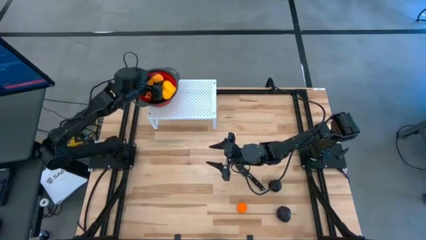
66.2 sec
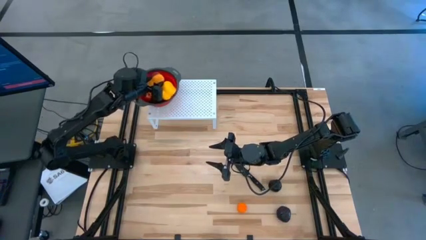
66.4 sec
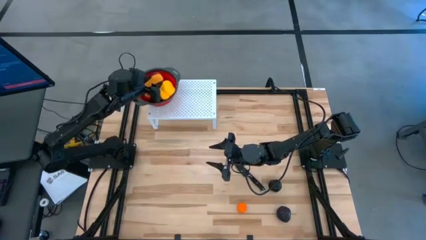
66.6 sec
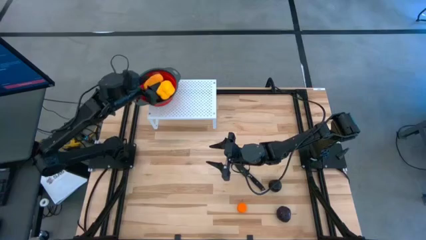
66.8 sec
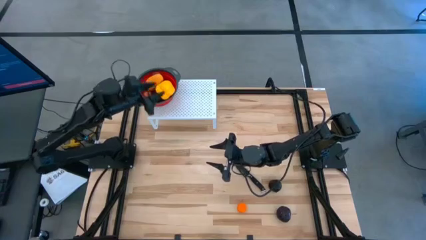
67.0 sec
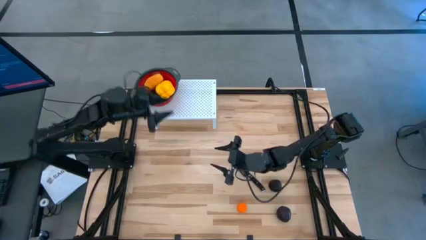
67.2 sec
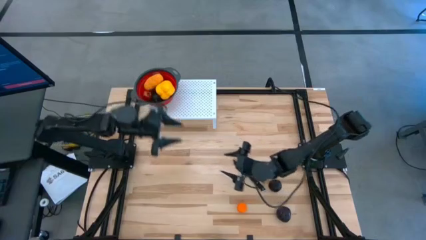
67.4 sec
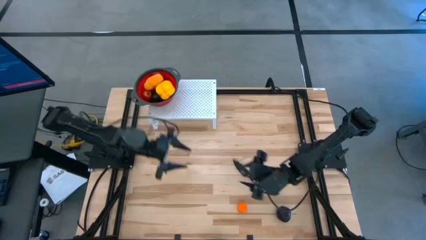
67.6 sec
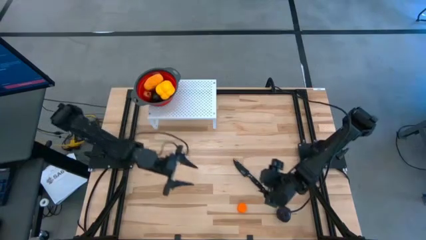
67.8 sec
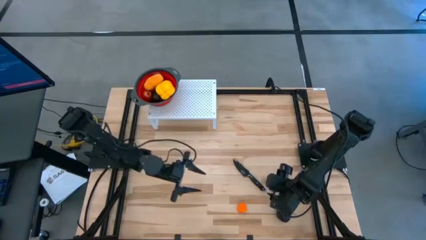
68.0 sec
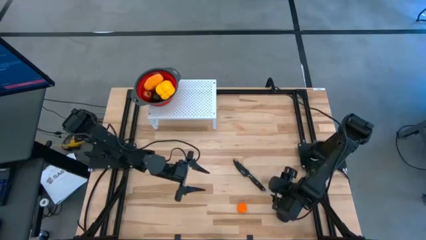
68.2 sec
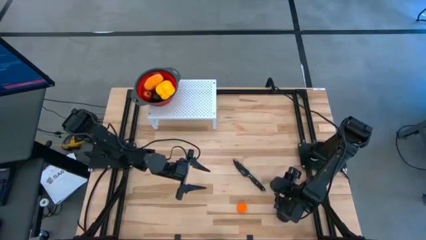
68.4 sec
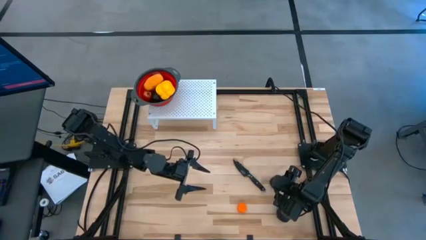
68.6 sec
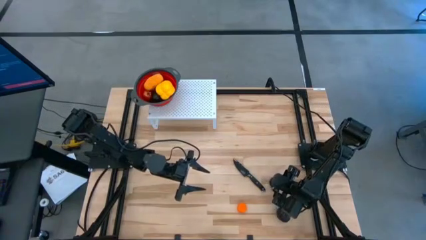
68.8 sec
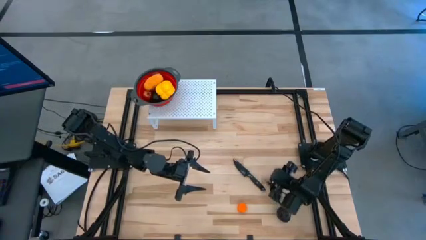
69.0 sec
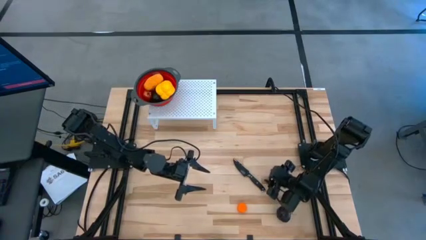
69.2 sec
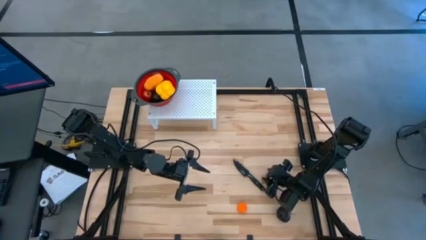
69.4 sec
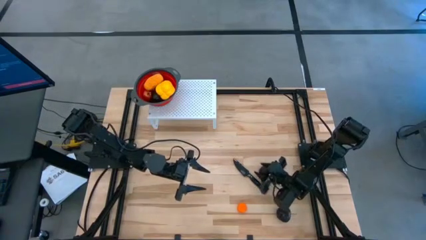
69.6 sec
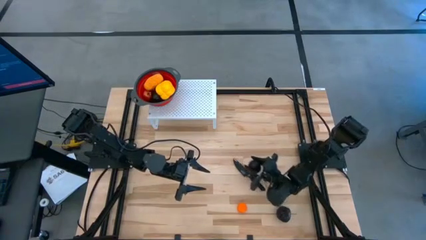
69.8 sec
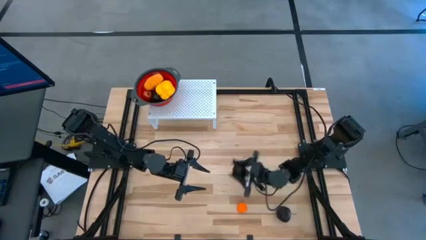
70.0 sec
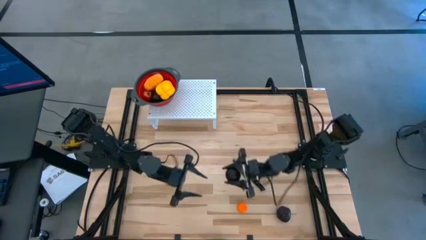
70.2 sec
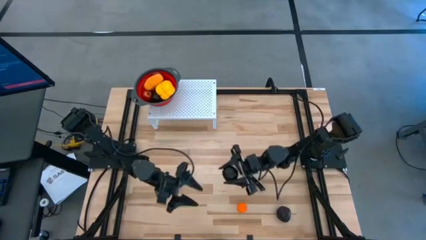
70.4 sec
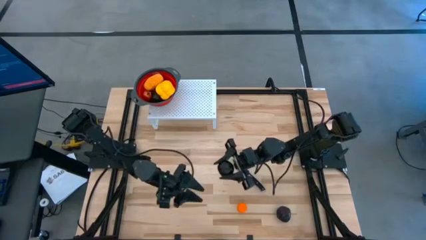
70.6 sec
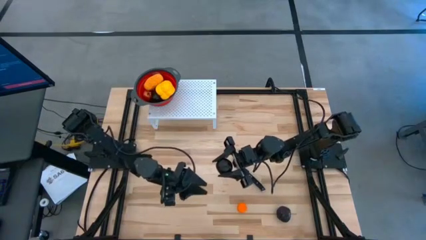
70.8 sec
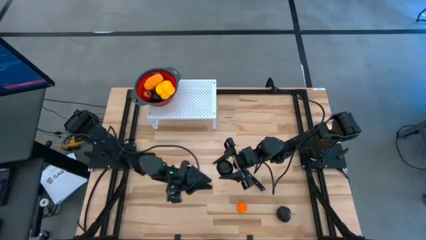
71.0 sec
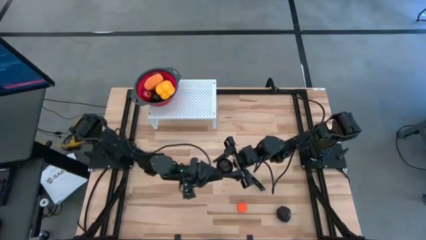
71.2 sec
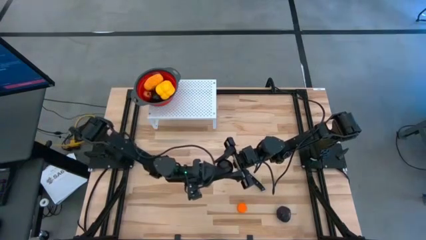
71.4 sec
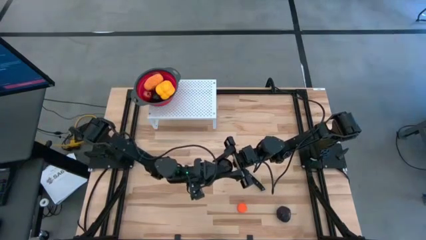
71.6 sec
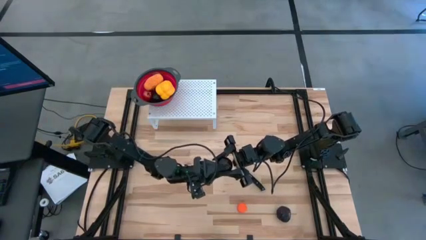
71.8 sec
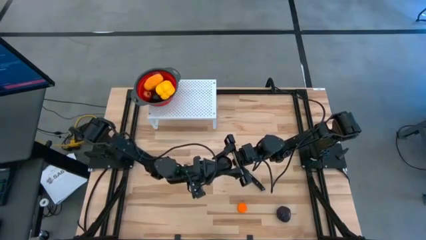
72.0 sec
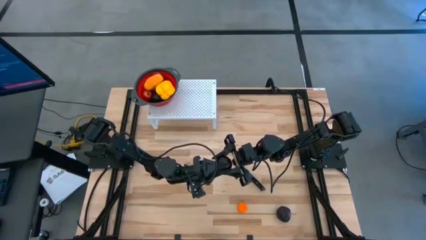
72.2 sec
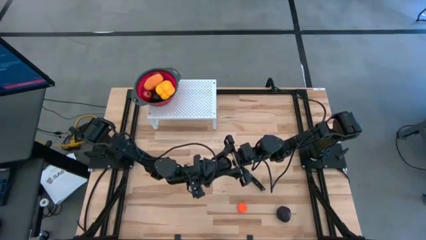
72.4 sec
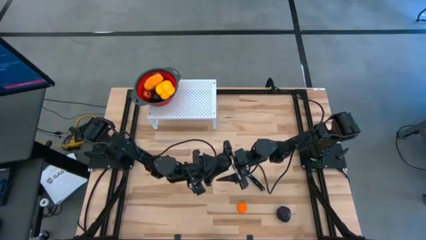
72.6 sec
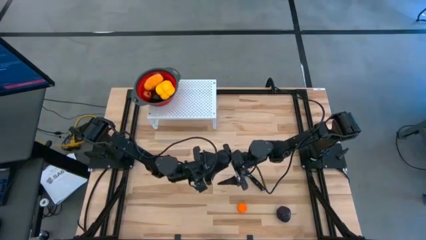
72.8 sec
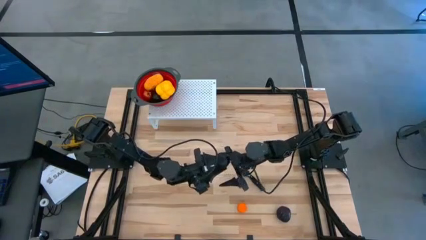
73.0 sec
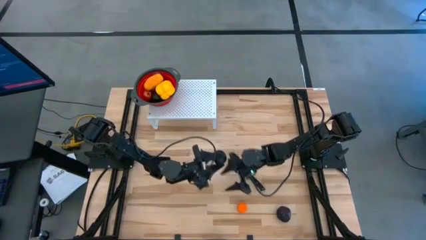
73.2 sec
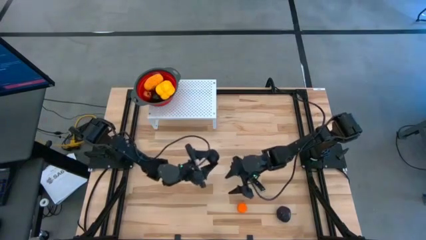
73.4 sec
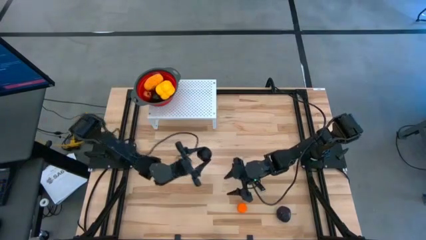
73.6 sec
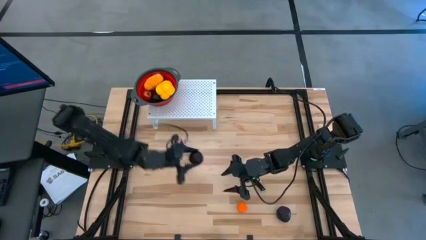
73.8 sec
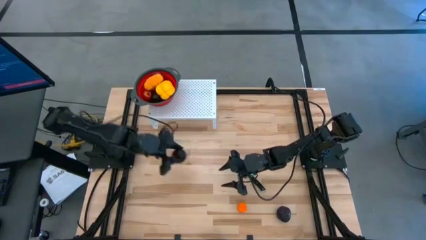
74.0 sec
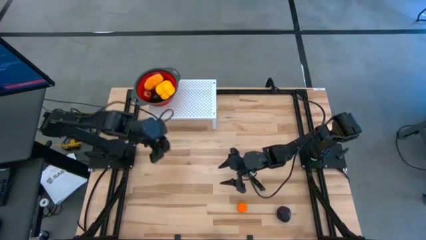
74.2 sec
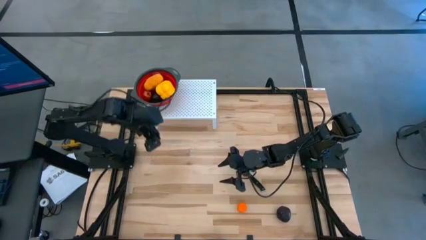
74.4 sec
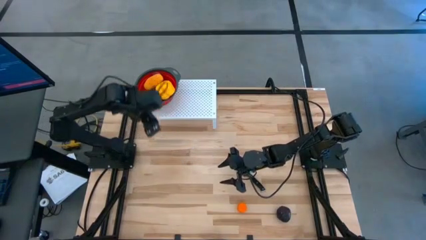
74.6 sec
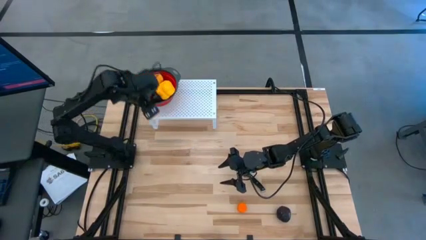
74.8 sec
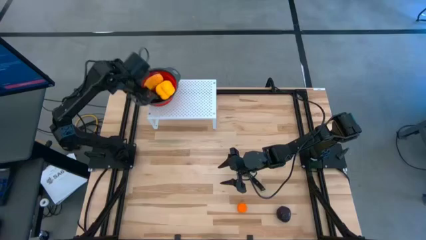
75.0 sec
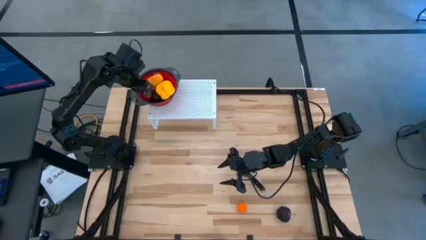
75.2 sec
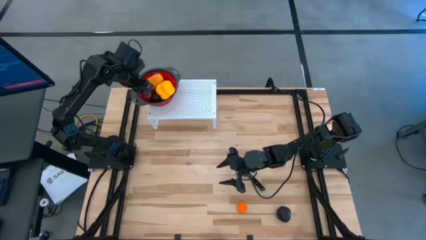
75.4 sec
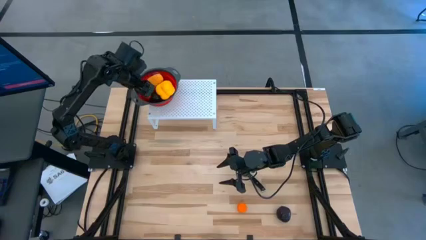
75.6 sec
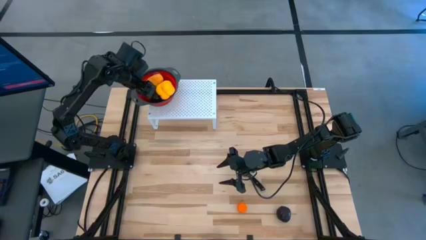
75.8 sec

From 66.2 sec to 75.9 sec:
Task: Pick & Place Fruit
Put the top purple plum into the red strainer bowl on the shelf

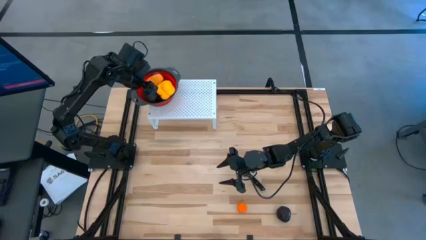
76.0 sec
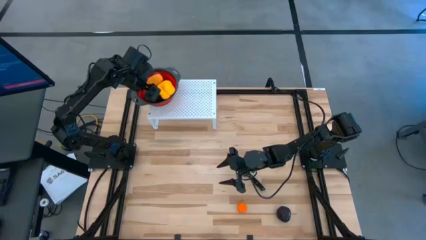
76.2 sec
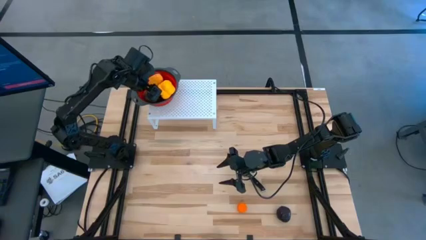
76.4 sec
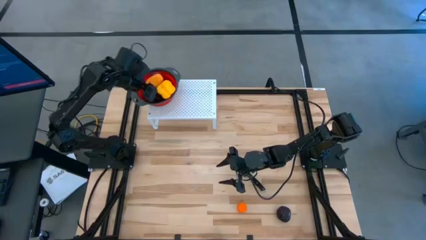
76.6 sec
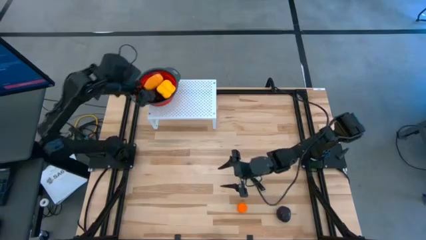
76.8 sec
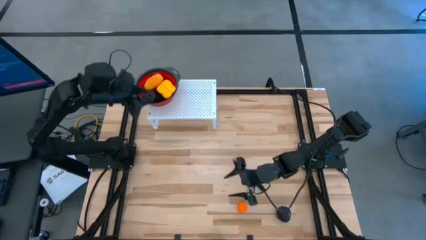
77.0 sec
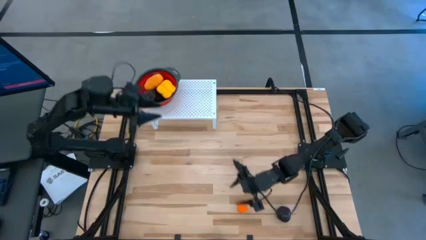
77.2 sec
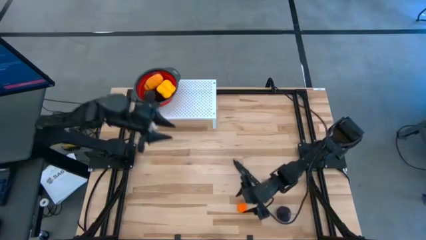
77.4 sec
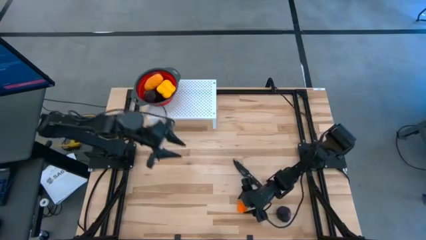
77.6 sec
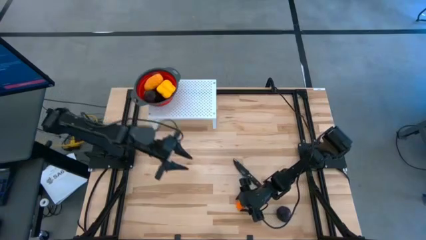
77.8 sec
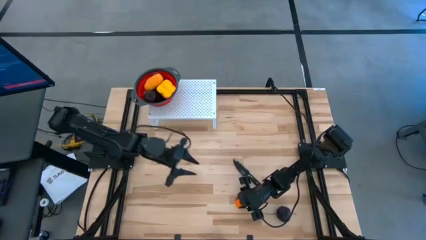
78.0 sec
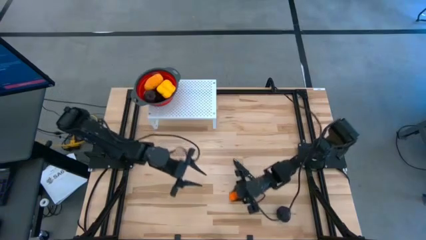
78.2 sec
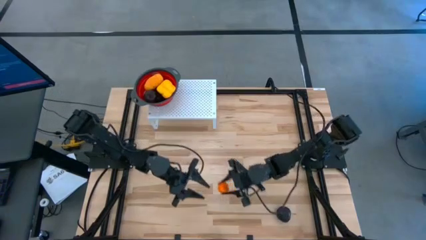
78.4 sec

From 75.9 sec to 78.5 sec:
Put the orange into the red strainer bowl on the shelf

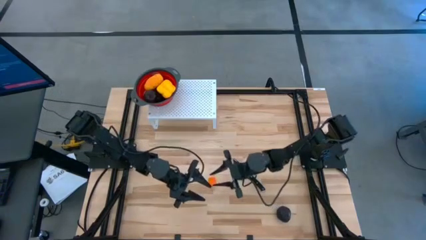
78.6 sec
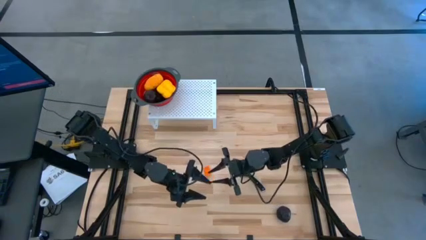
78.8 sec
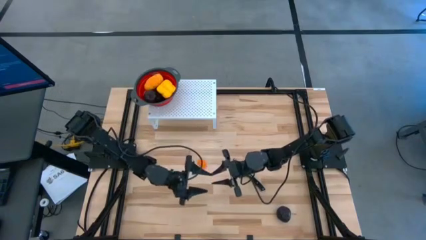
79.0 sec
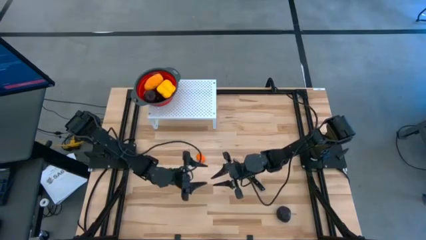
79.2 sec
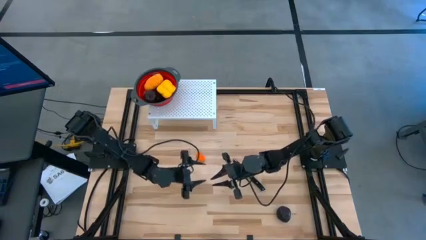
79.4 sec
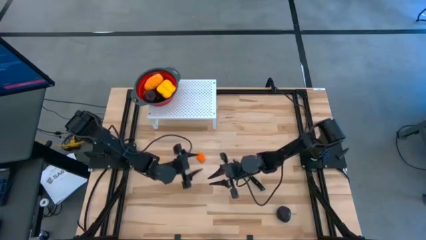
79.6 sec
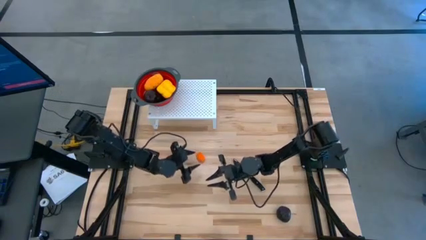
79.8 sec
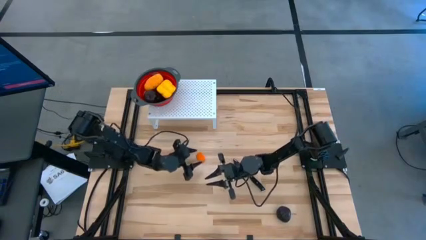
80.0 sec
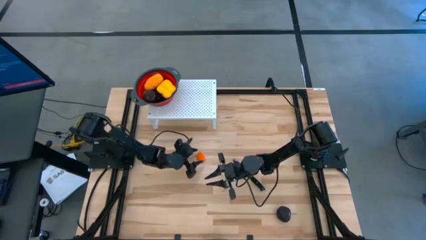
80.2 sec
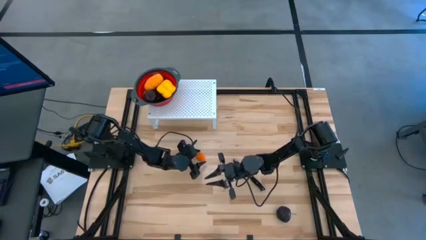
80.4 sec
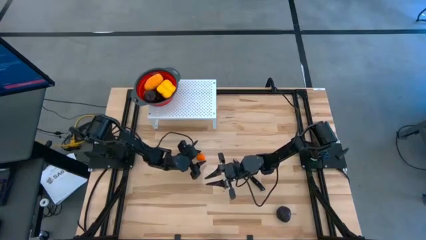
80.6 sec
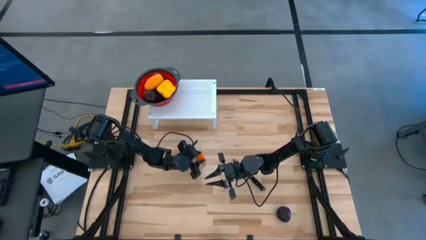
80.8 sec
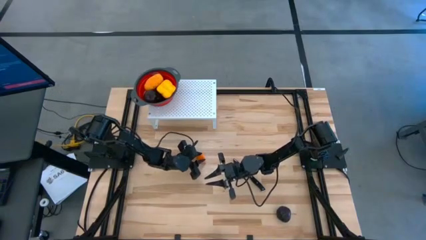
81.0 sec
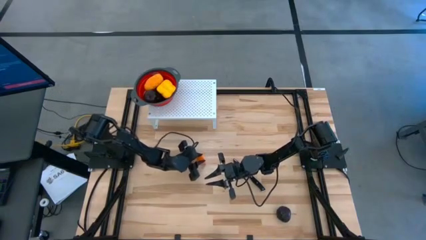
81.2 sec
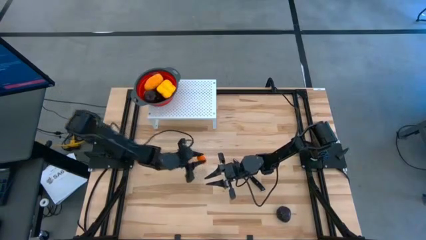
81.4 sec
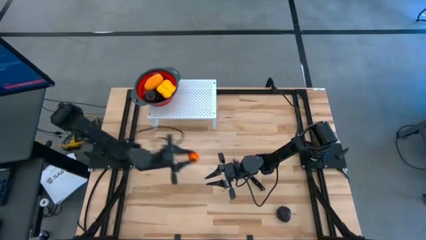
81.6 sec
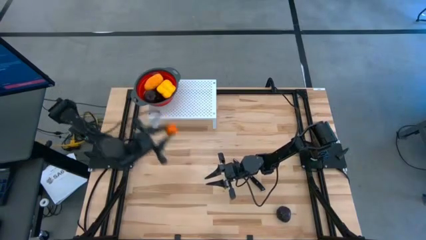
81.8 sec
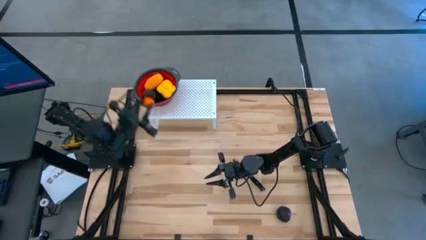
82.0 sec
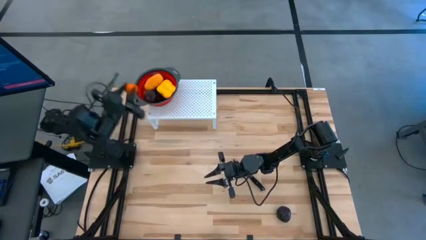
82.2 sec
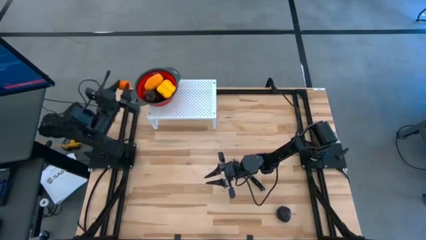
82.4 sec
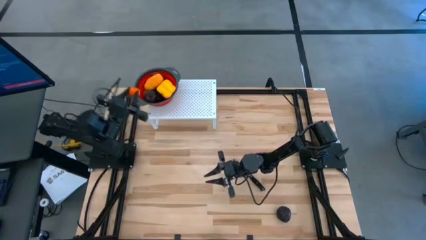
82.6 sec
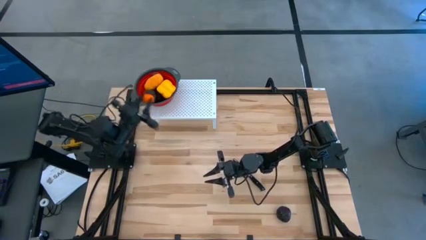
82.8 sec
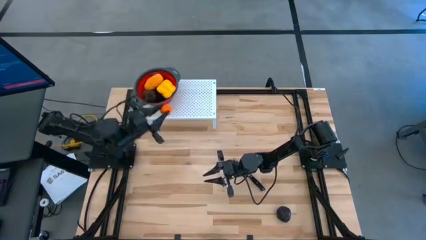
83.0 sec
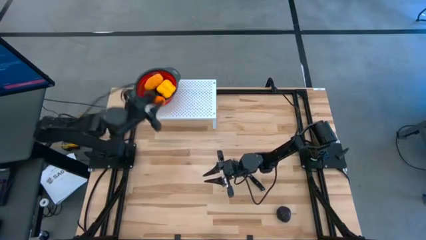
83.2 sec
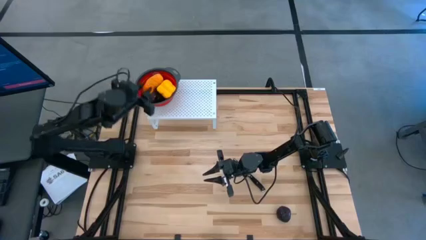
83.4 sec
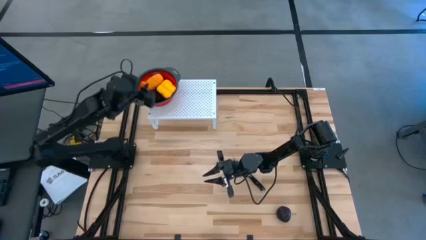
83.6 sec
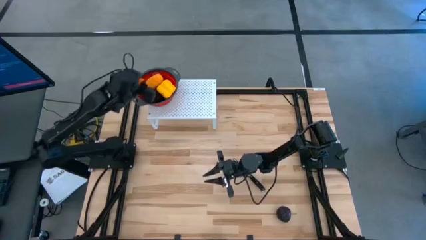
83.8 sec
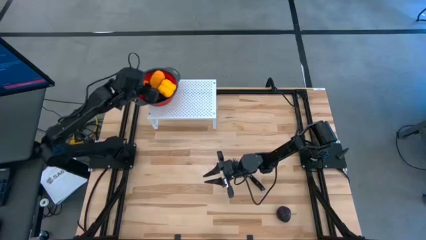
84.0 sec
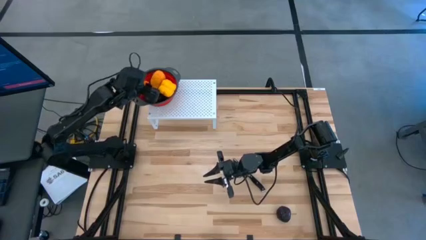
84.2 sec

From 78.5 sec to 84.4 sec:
Put the orange into the red strainer bowl on the shelf
